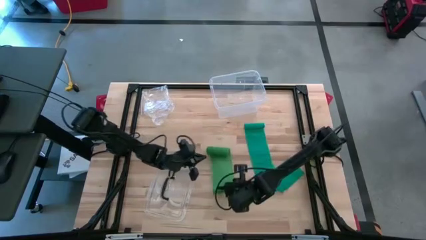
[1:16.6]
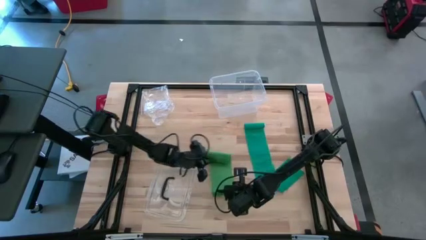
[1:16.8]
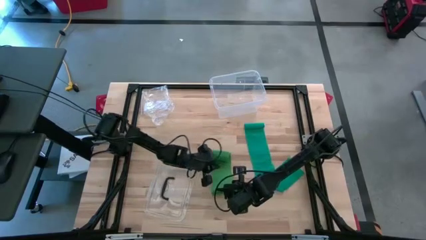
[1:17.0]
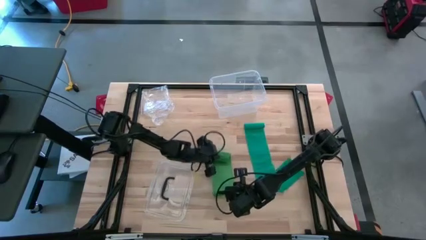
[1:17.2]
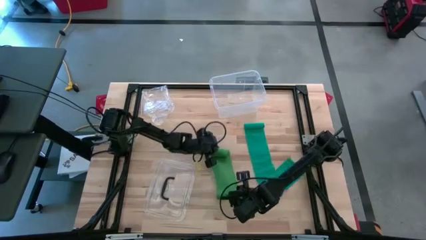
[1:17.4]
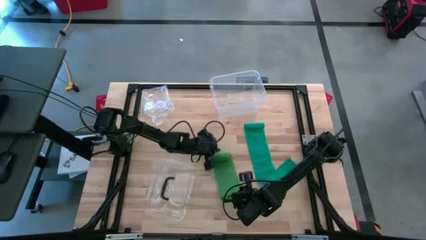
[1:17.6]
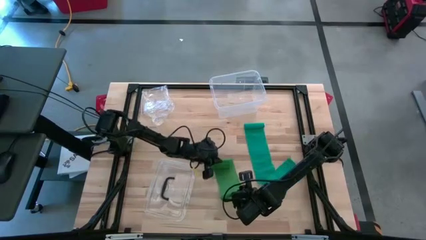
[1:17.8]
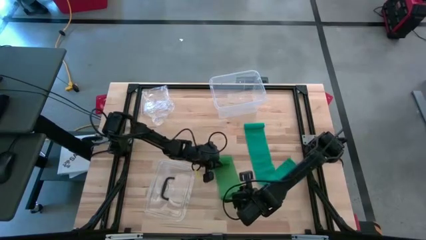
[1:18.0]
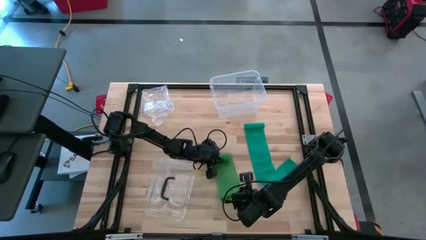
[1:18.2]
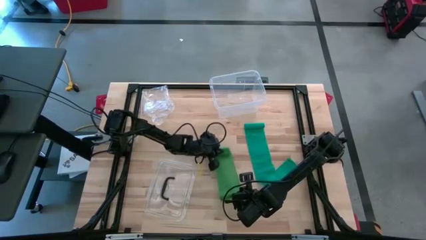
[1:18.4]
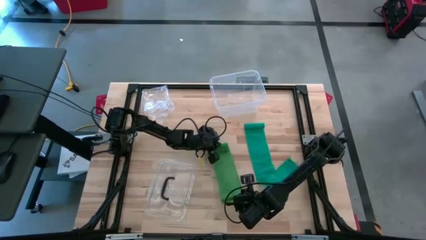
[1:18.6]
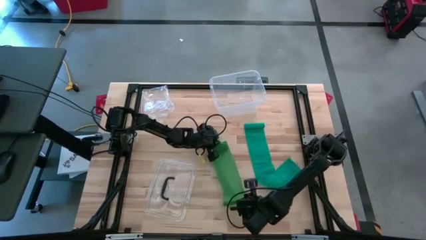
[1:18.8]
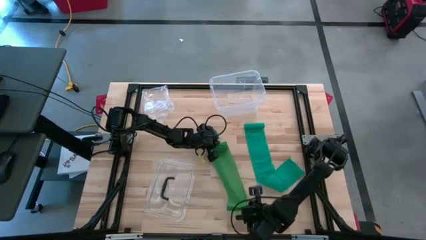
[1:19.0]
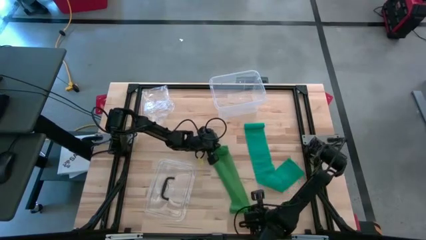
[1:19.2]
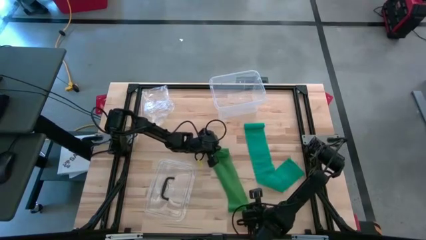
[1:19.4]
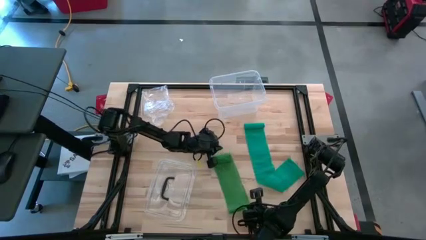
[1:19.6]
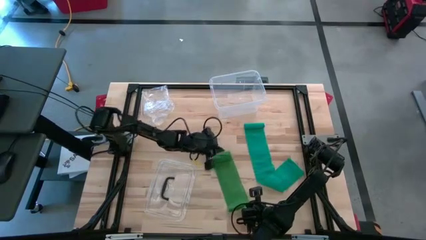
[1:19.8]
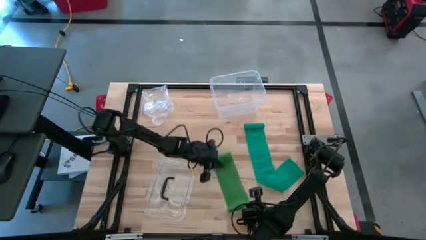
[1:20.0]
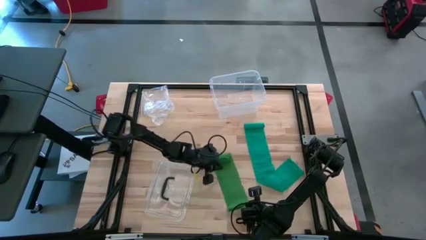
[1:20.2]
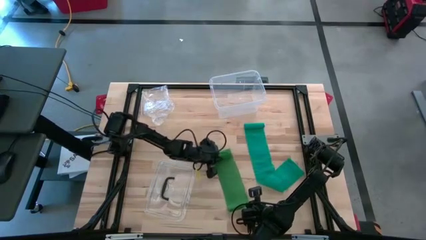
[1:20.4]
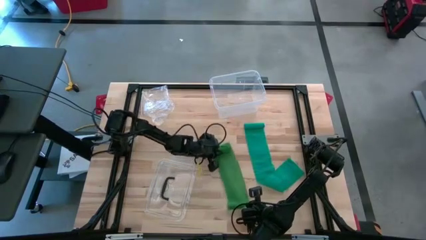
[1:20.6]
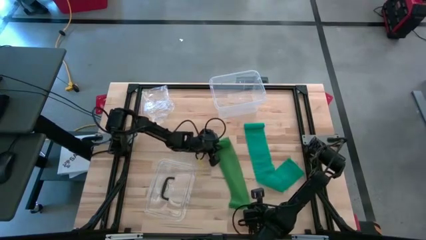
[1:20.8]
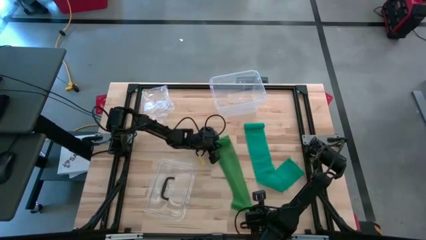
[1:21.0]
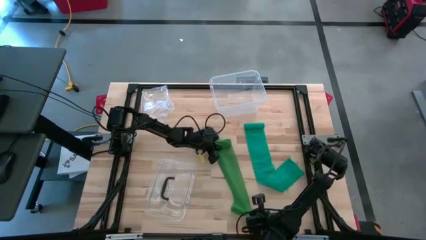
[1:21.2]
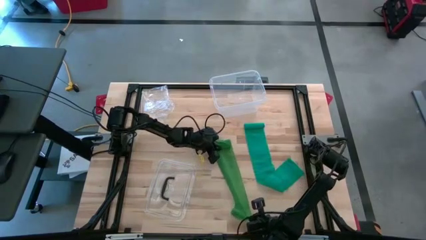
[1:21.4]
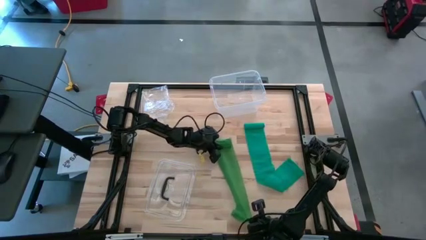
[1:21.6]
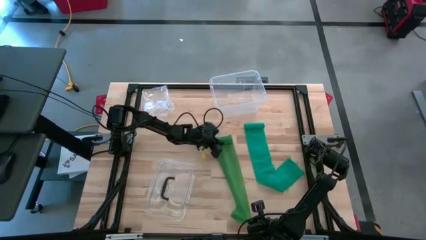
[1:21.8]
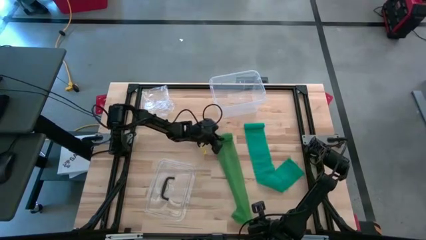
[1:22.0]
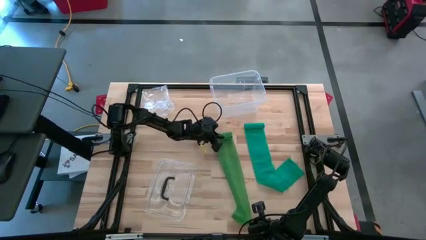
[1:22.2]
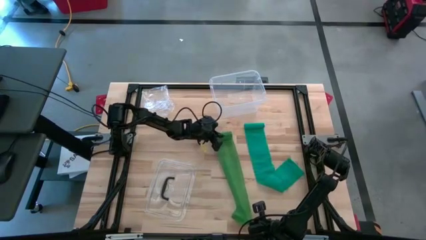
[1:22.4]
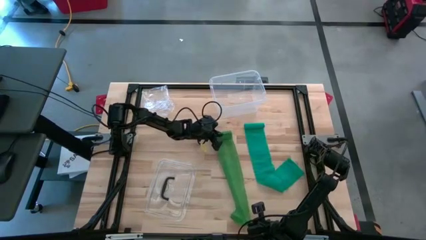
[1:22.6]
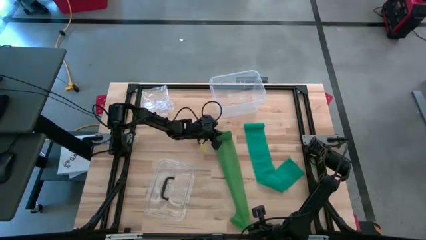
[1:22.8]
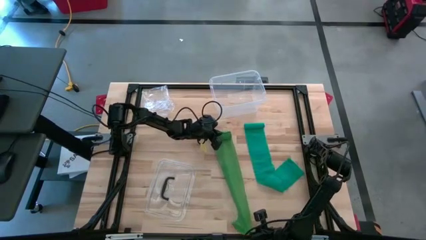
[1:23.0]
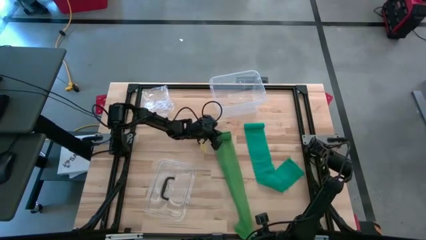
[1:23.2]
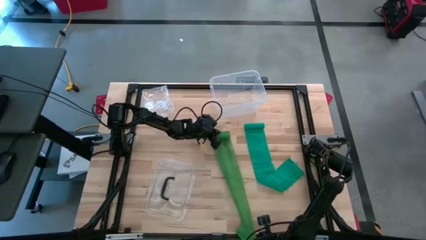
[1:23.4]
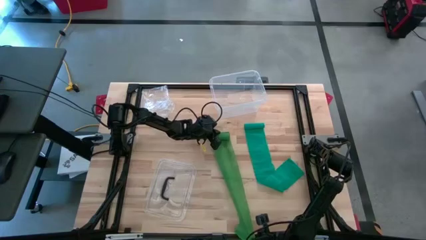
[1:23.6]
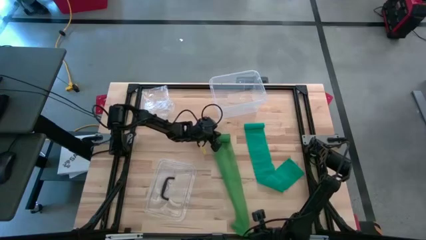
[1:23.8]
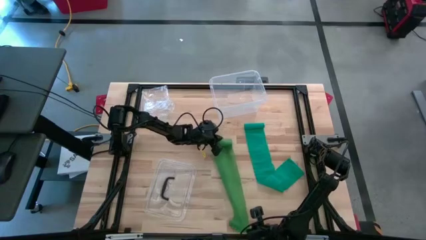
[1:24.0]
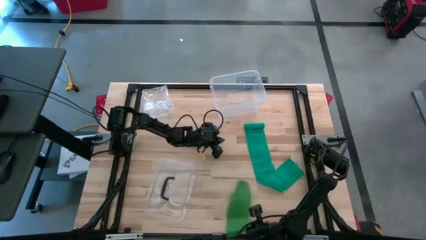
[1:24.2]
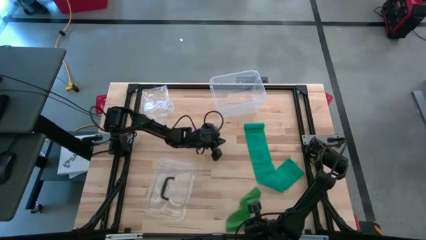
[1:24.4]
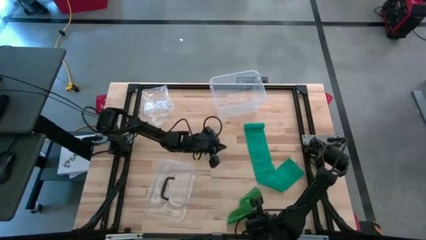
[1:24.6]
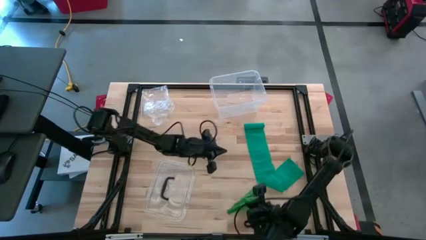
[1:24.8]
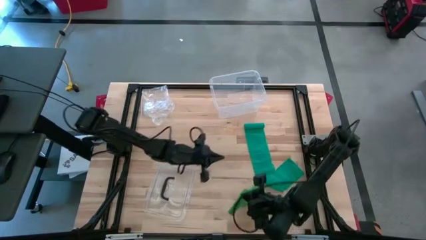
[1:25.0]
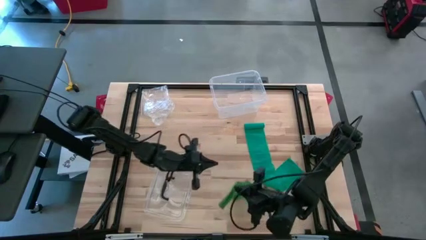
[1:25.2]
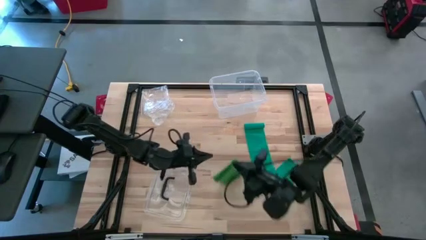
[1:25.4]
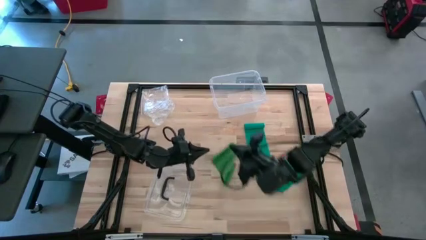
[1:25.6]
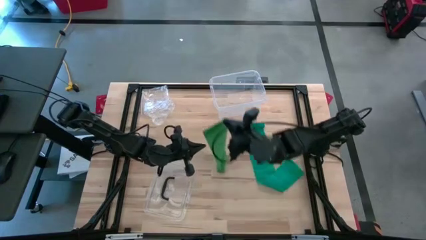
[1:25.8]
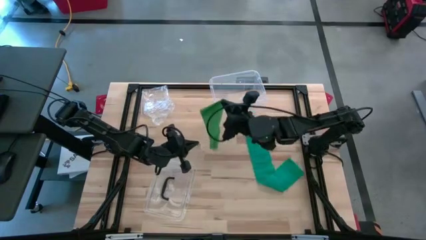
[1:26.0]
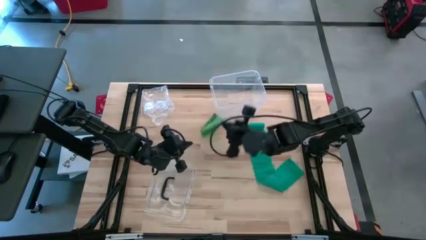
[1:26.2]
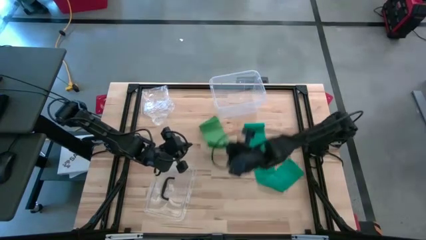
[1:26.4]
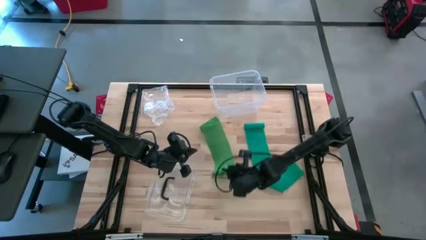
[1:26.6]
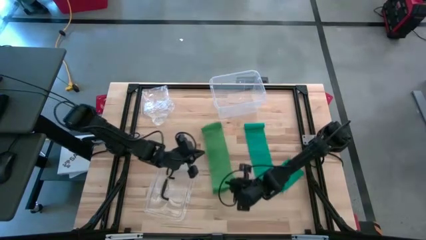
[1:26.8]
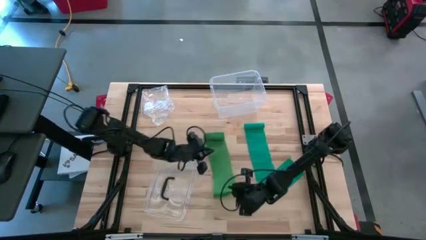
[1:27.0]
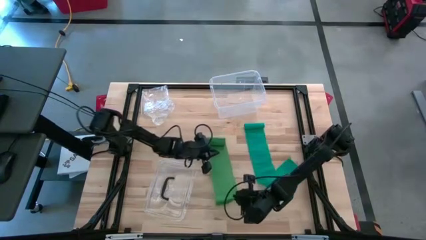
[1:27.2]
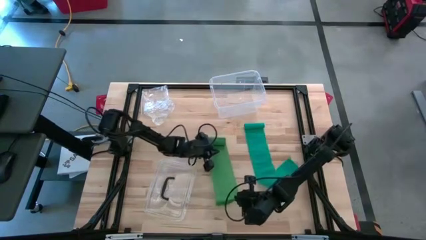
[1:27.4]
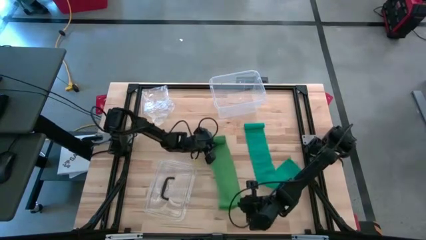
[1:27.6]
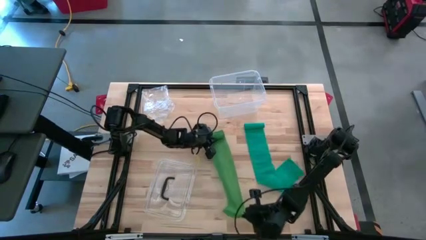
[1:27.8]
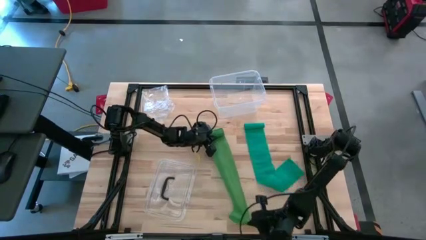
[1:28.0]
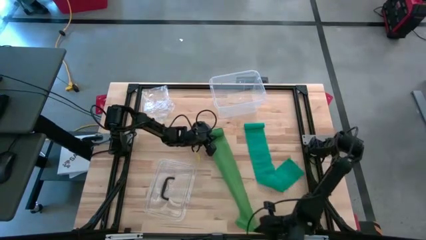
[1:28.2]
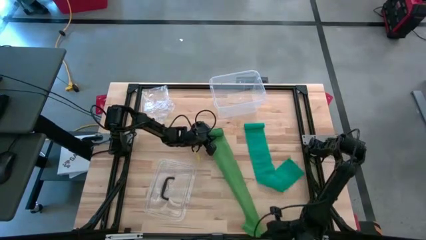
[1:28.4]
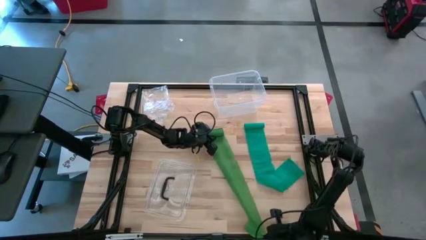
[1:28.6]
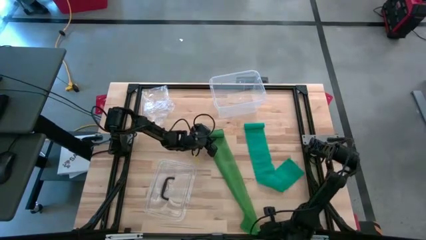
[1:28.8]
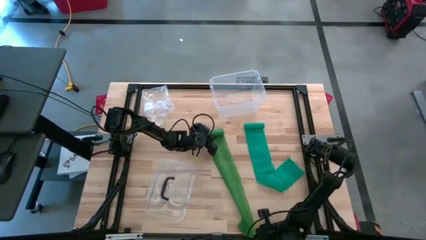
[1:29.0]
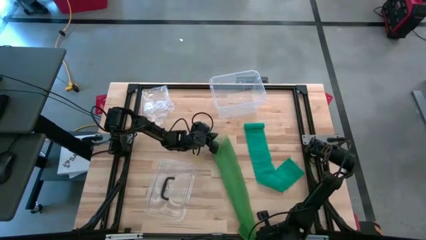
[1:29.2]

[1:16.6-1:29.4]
Task: Roll bandage
Roll the green bandage

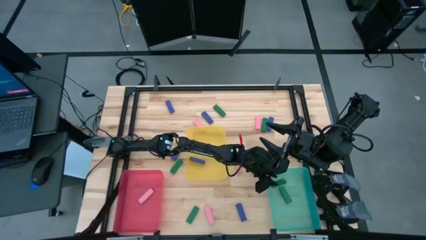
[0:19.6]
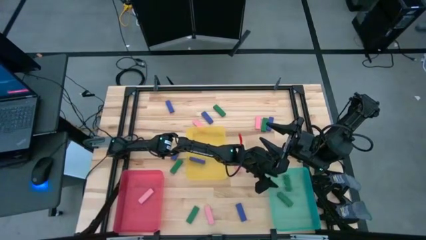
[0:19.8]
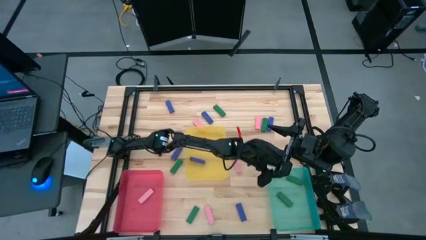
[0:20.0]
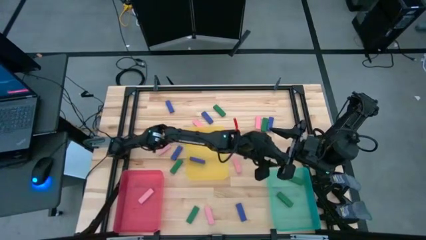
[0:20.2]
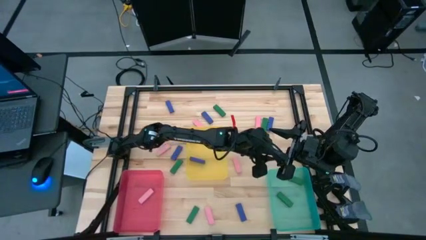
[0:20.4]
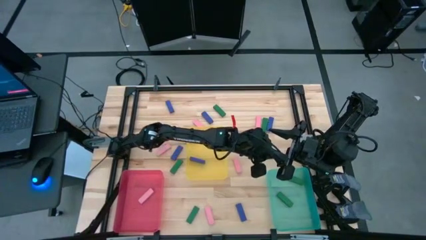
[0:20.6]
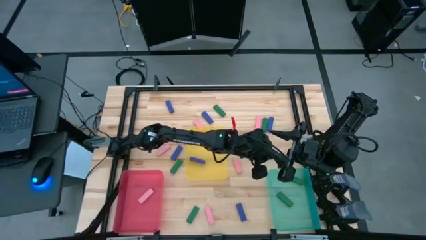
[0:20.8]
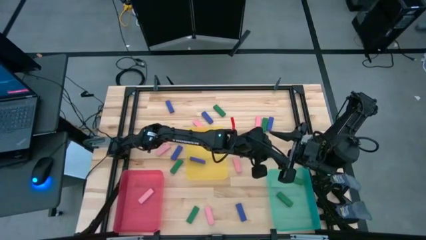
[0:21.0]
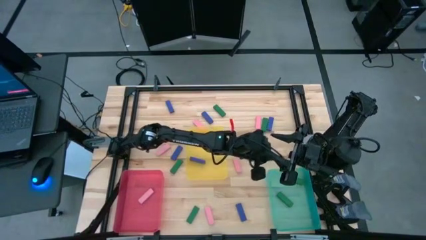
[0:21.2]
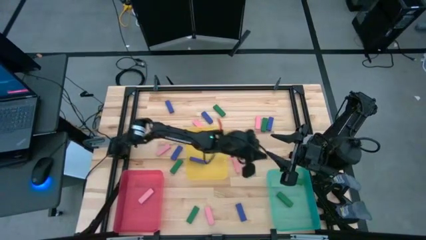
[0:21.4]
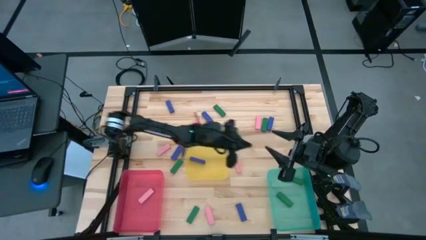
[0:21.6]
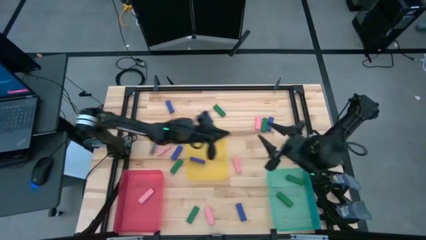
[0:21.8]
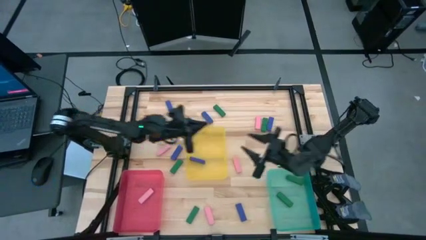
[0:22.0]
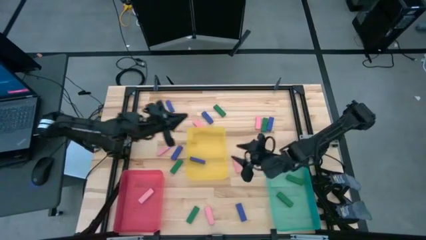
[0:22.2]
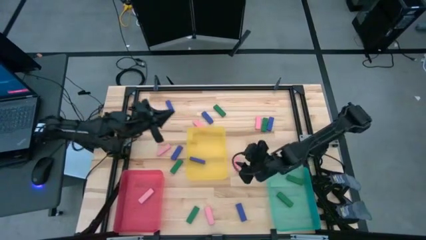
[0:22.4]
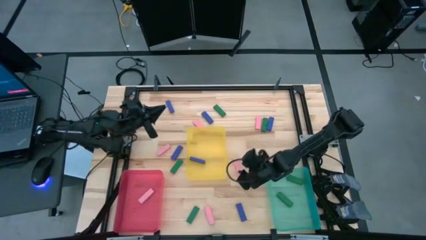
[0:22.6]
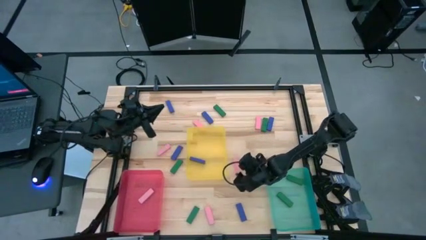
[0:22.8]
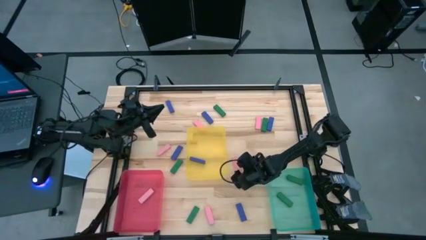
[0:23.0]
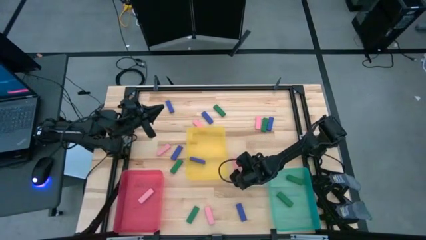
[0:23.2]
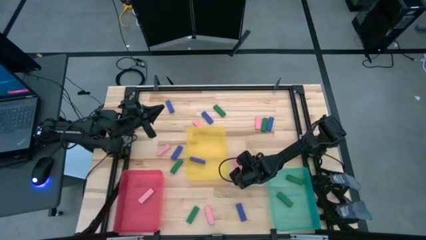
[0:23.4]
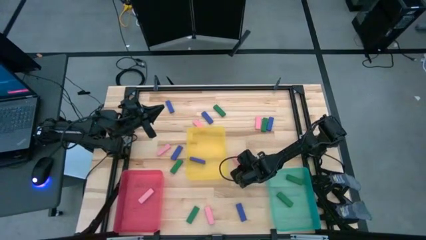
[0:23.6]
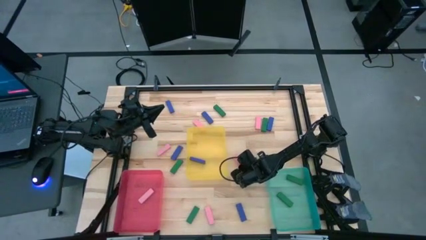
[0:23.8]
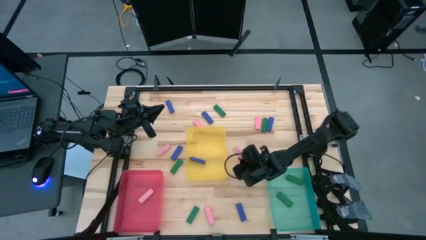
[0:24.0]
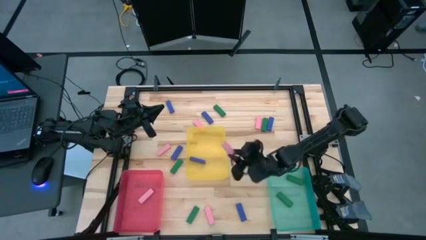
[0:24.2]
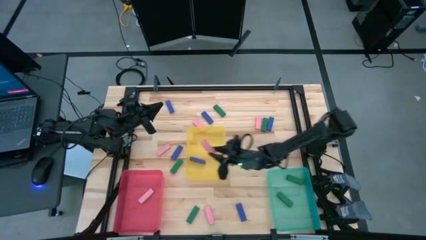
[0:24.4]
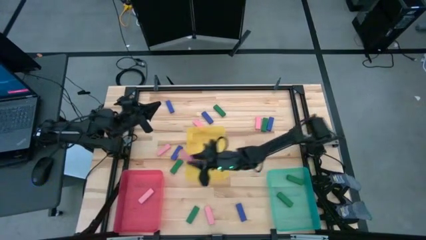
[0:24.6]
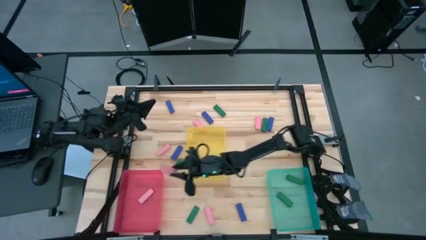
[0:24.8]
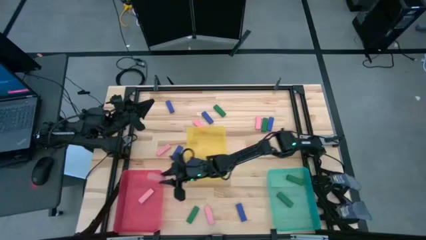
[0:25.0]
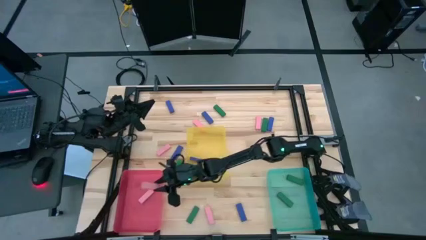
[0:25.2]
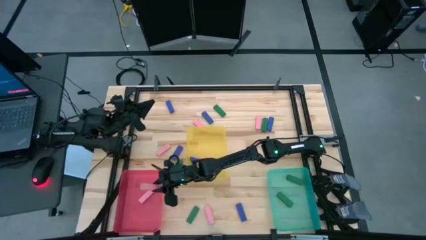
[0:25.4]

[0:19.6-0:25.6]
Task: Sort blocks
Put the pink block into the red bin
